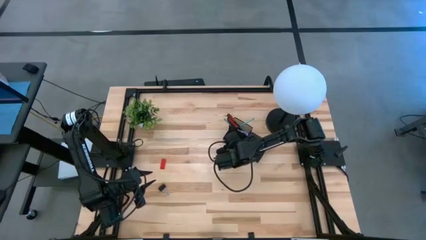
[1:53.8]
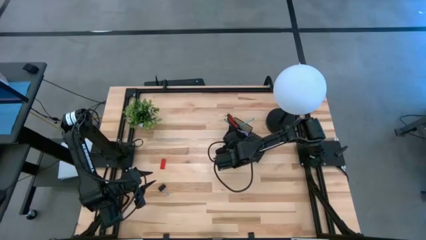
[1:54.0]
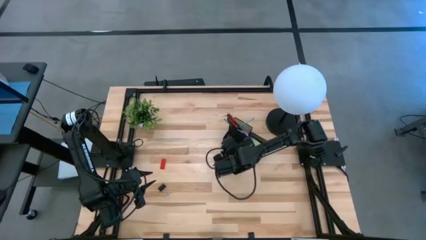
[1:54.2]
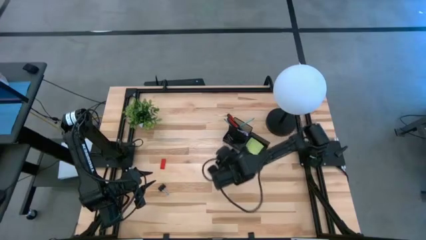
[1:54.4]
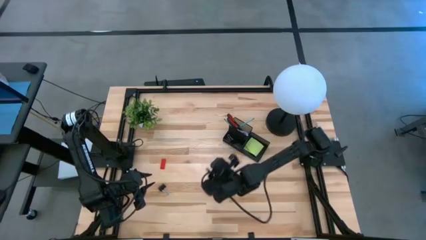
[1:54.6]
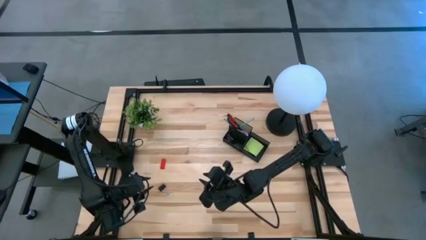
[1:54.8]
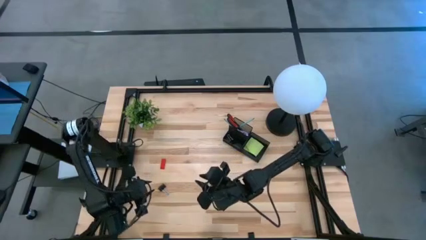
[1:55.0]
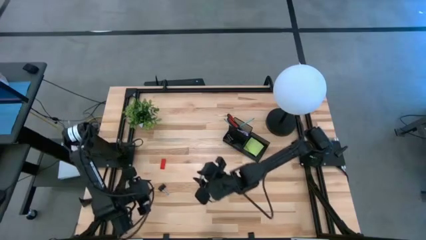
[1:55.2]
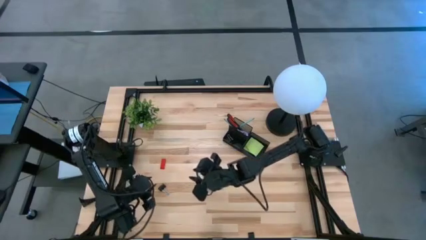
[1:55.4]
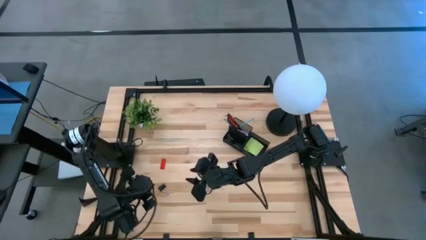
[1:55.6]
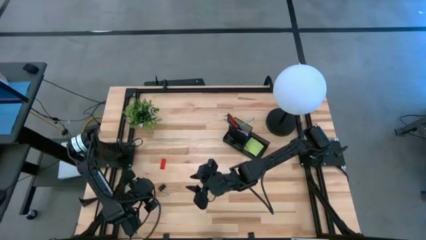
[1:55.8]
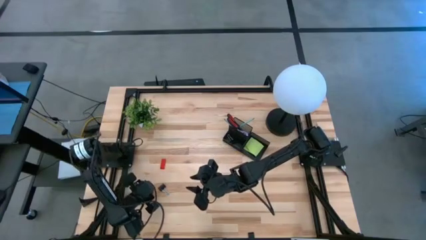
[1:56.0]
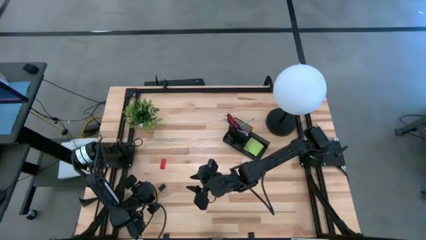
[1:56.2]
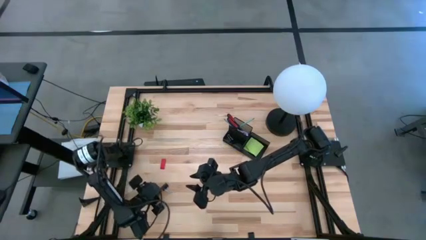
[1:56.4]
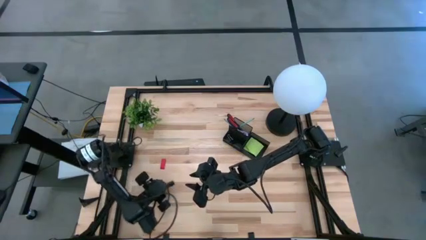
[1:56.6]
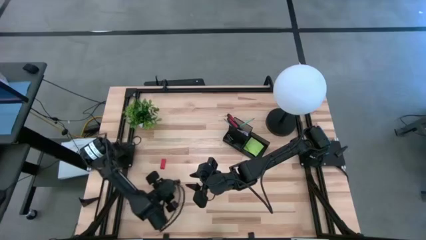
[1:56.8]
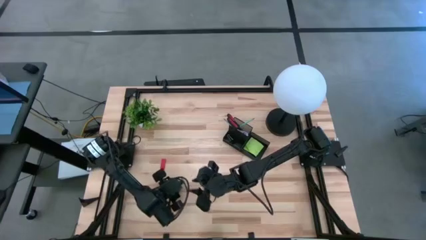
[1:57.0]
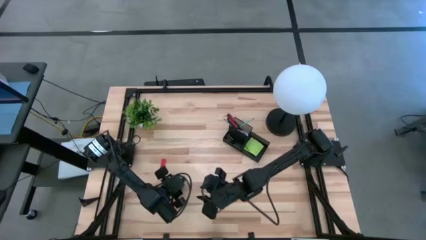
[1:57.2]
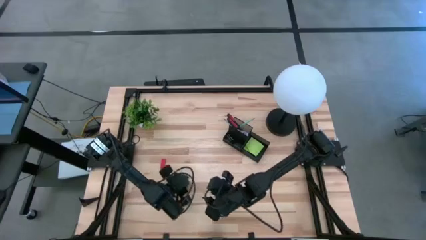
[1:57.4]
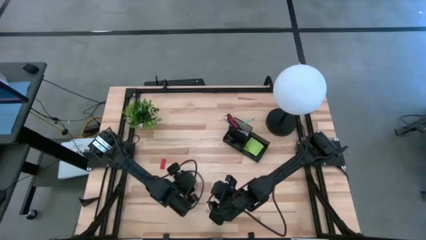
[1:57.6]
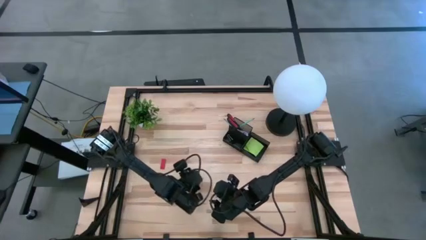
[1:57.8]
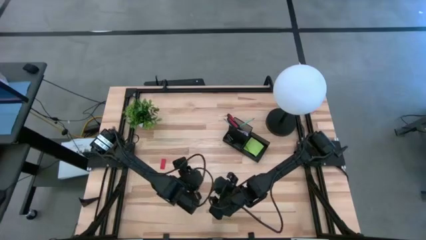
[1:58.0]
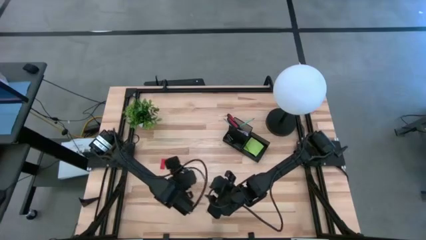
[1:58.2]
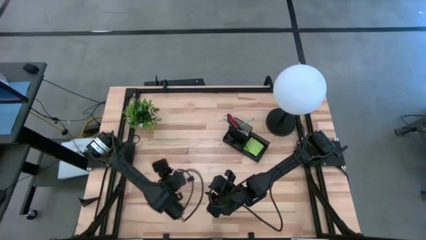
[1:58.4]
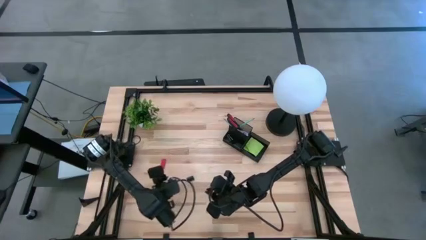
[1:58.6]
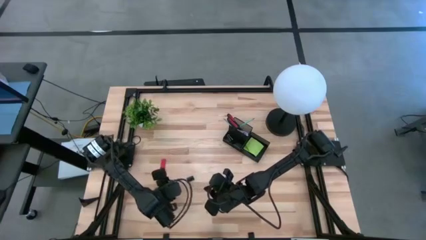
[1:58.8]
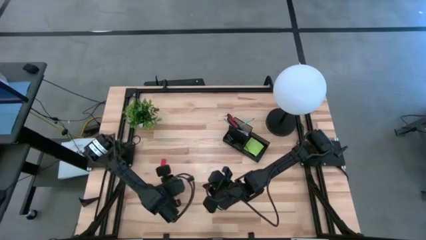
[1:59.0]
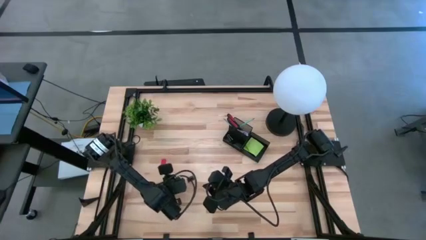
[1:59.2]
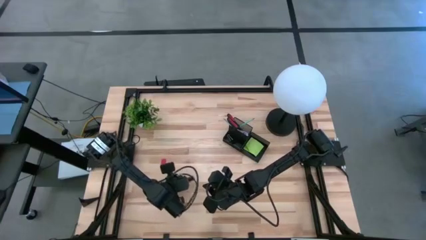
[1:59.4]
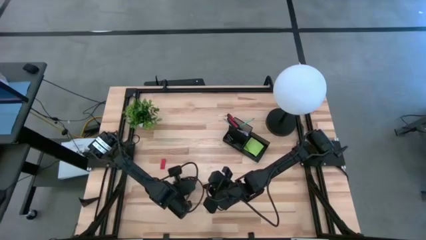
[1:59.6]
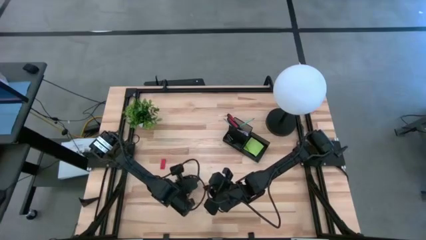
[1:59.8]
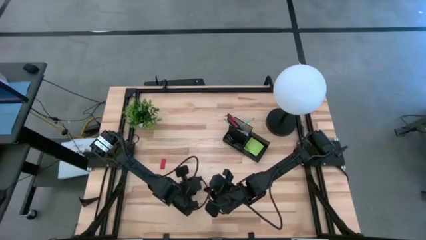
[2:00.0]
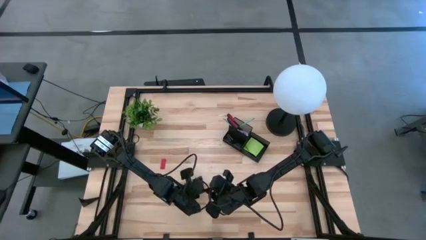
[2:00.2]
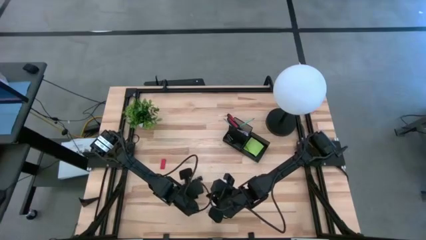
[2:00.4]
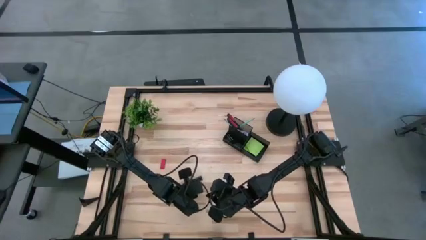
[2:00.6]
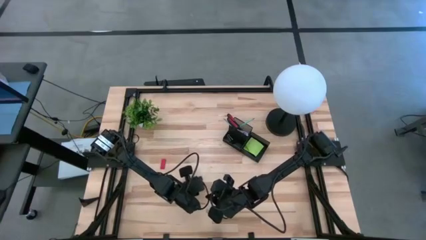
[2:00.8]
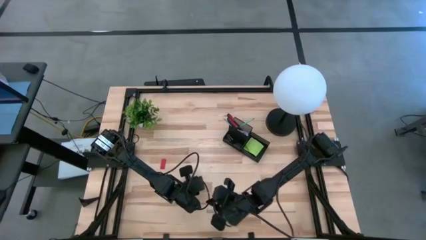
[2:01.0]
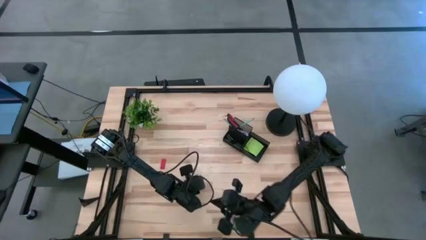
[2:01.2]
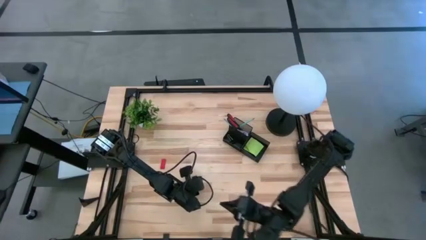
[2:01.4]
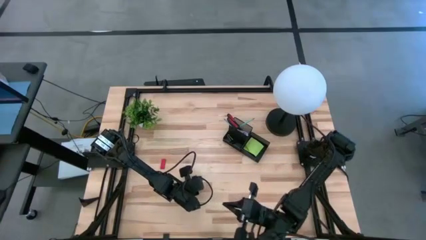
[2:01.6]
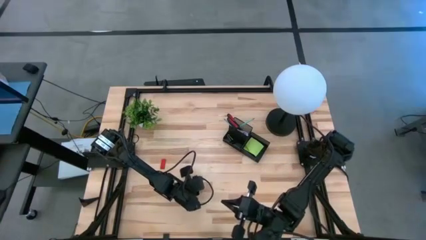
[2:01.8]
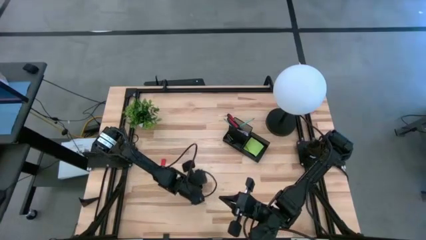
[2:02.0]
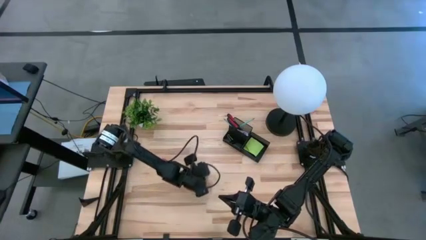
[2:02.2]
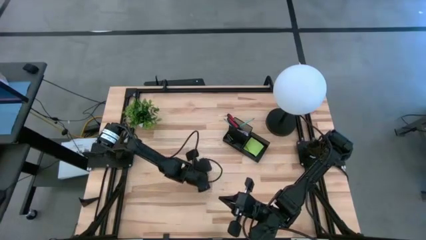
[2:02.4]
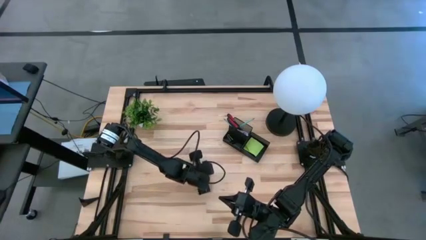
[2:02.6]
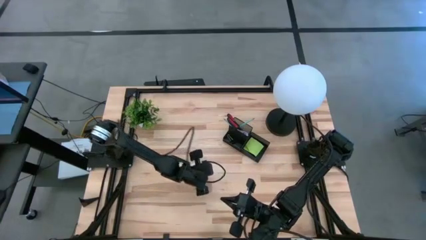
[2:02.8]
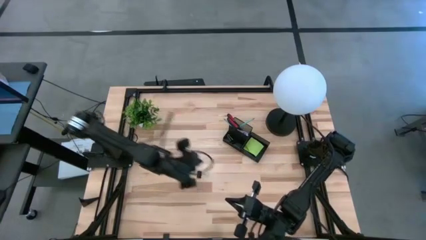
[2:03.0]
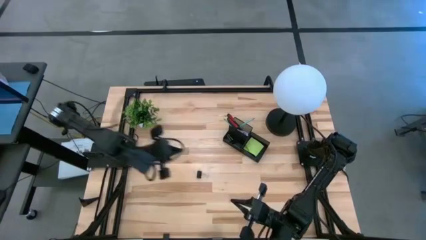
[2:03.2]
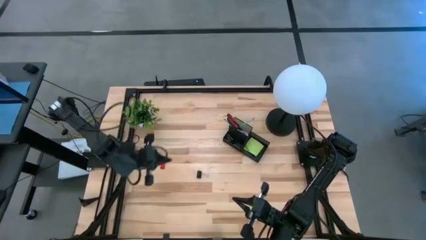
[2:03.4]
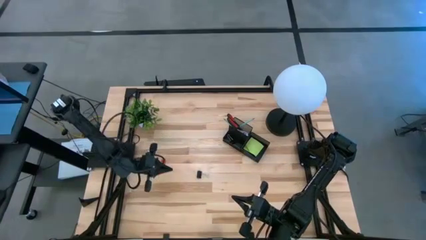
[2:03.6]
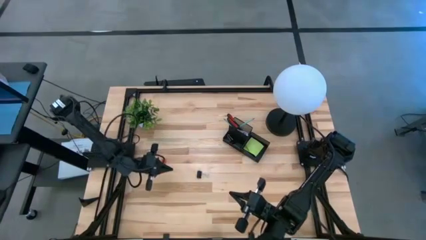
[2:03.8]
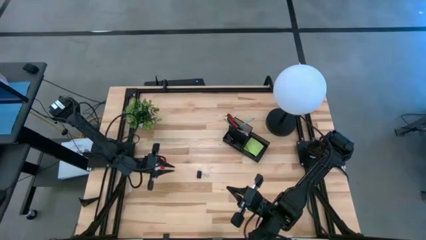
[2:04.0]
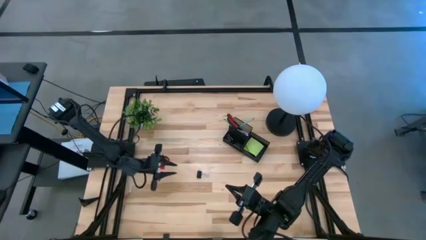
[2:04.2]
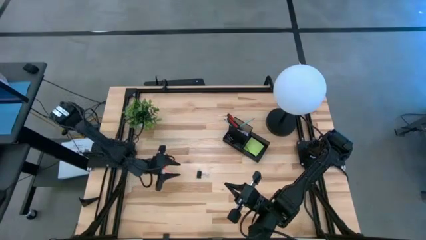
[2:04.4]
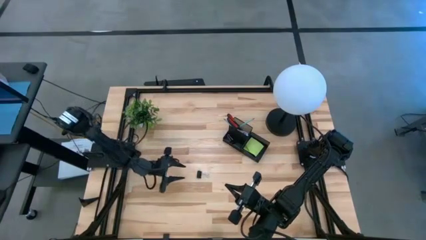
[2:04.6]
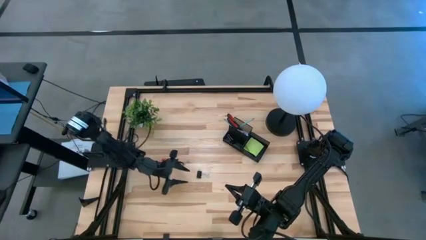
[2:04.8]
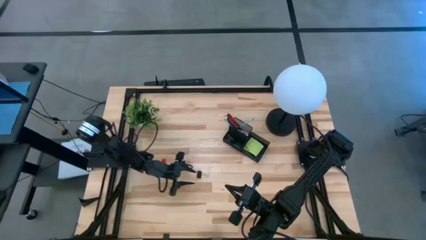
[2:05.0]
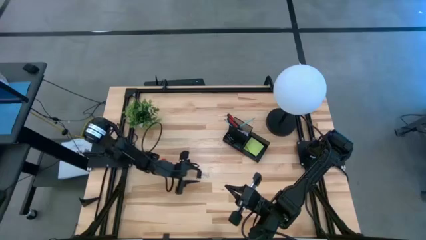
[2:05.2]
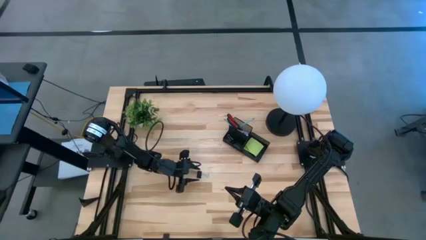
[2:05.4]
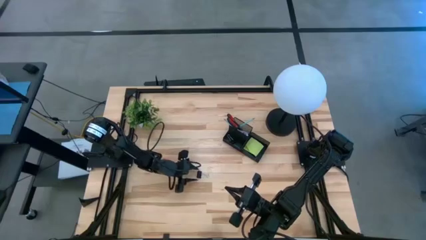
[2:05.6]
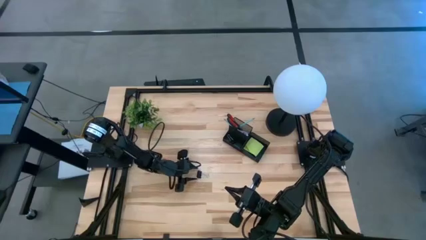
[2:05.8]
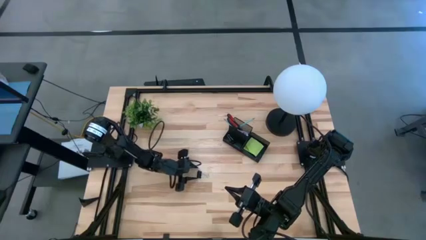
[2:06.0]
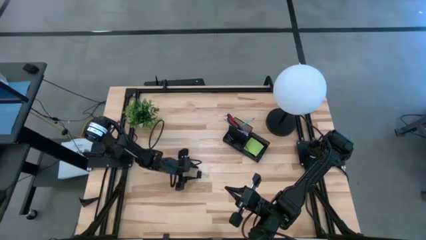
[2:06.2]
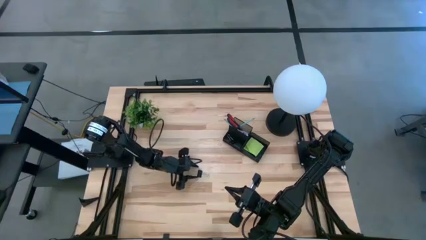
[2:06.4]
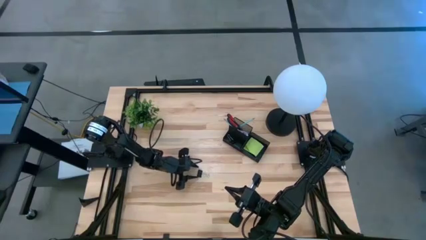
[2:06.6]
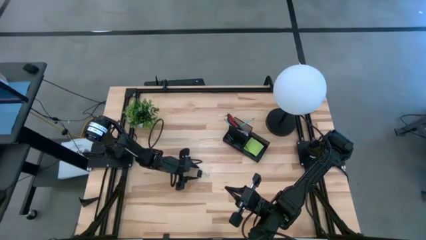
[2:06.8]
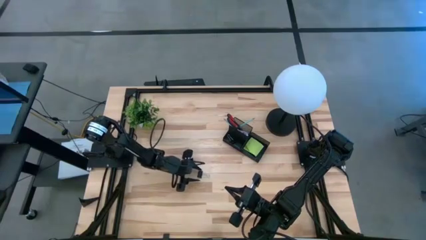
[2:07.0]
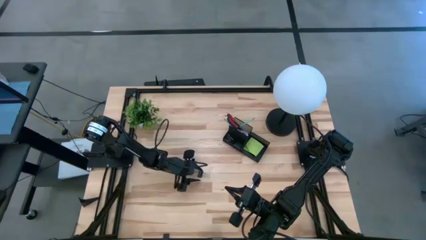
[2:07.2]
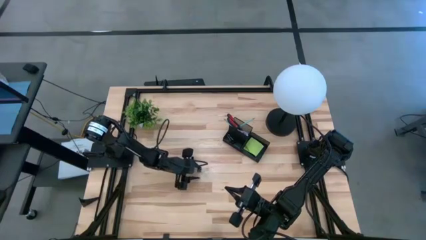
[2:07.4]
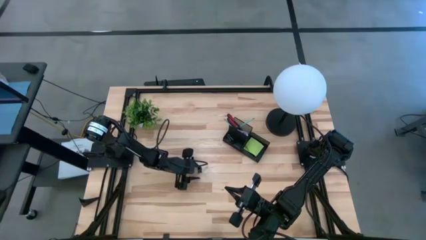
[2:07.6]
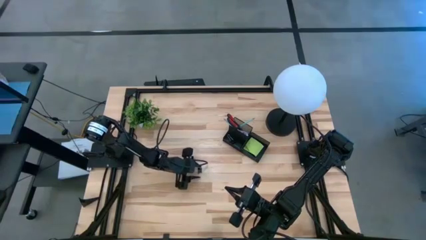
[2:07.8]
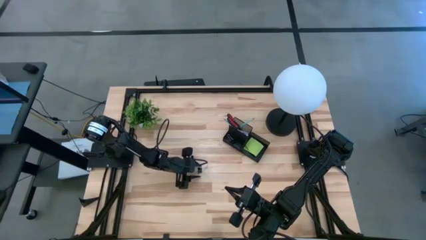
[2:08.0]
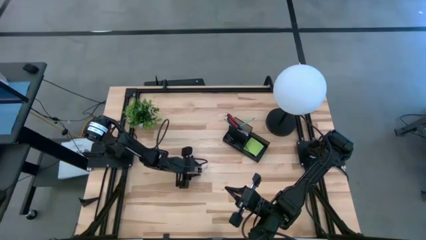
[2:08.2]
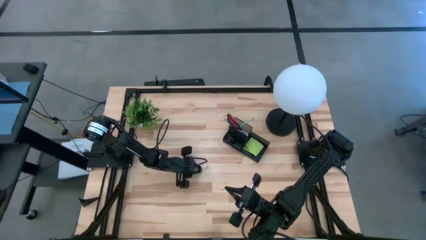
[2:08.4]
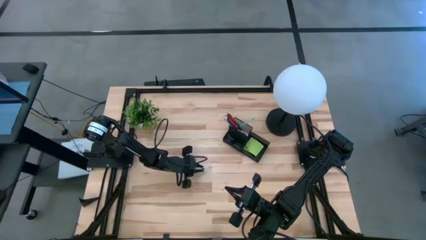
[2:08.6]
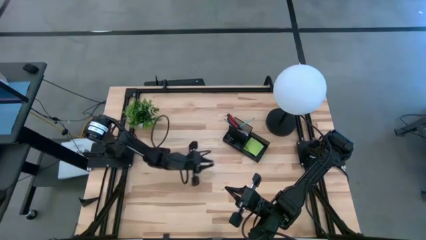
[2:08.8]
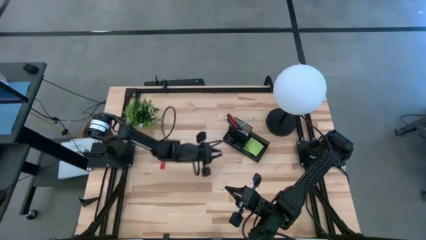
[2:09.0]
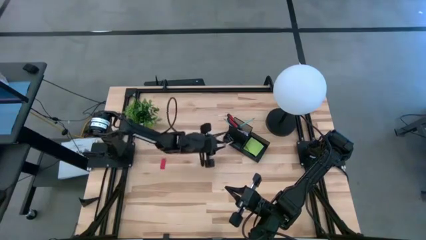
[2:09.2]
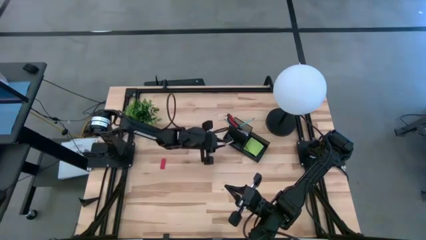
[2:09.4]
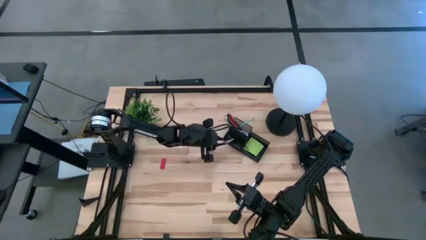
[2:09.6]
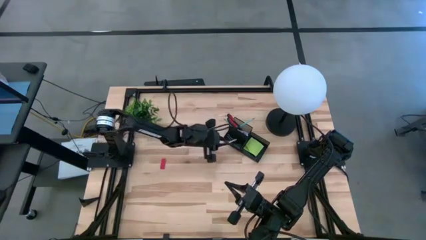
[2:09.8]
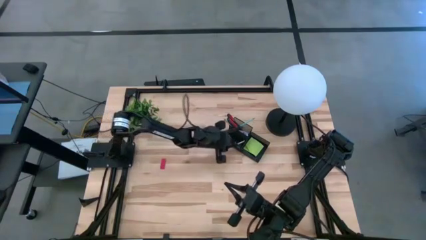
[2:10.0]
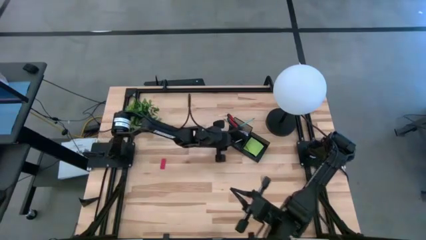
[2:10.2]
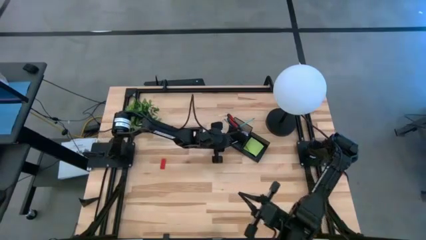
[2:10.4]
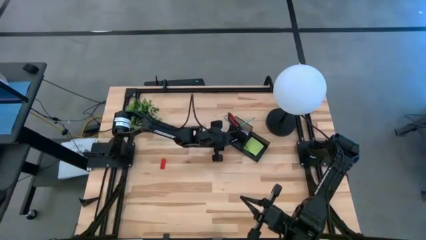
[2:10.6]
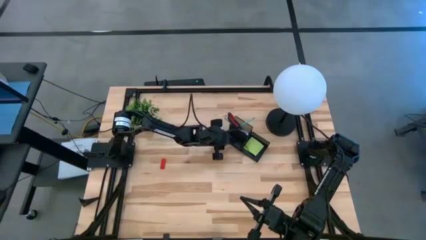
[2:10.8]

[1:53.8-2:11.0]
Task: Pick and place office supplies into organizer
Put the black binder clip into the desk organizer
